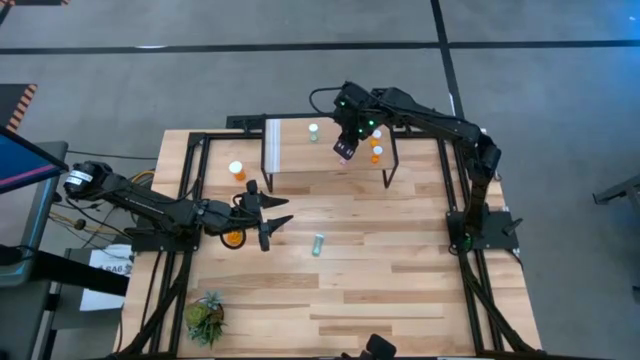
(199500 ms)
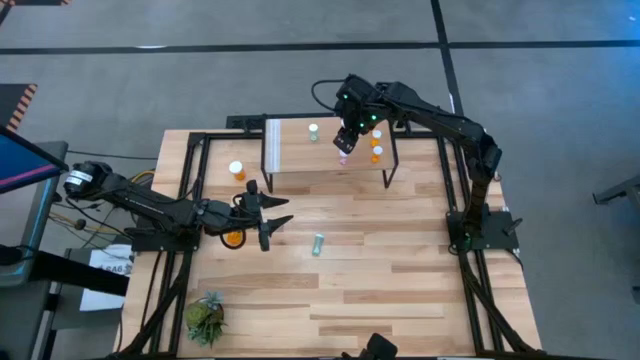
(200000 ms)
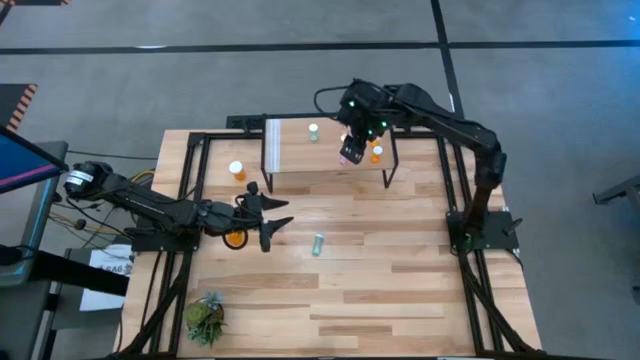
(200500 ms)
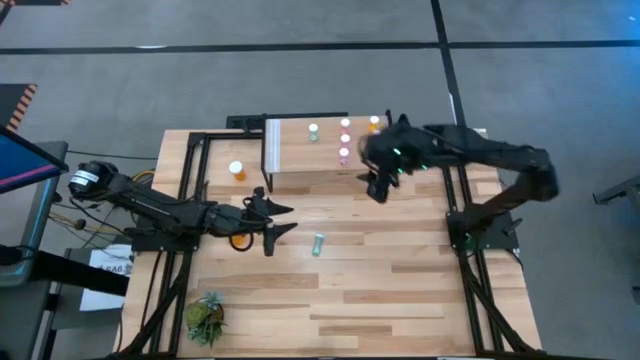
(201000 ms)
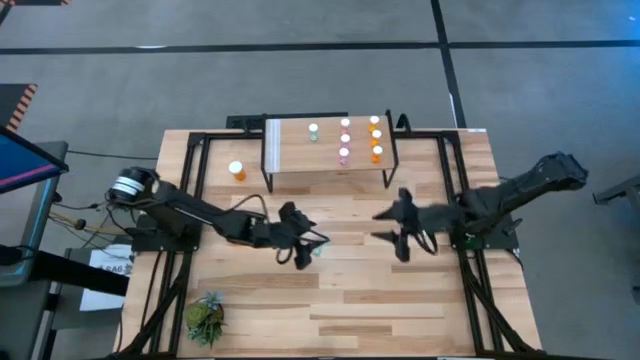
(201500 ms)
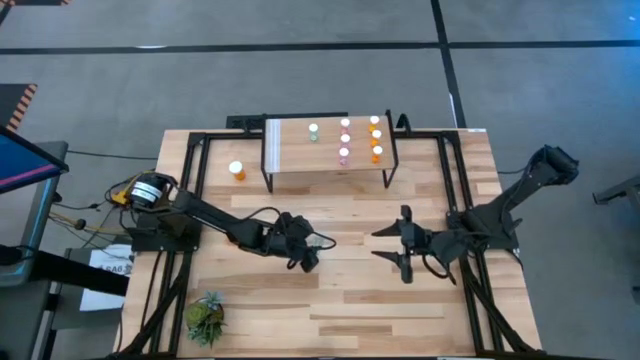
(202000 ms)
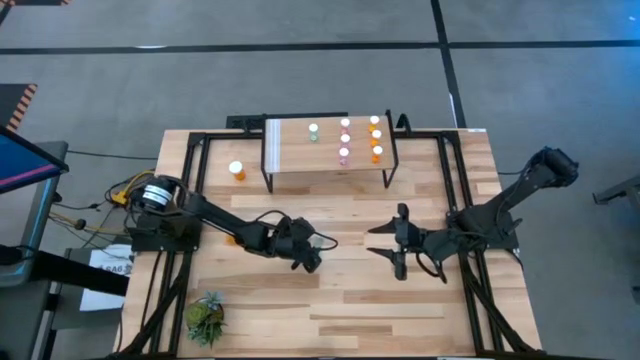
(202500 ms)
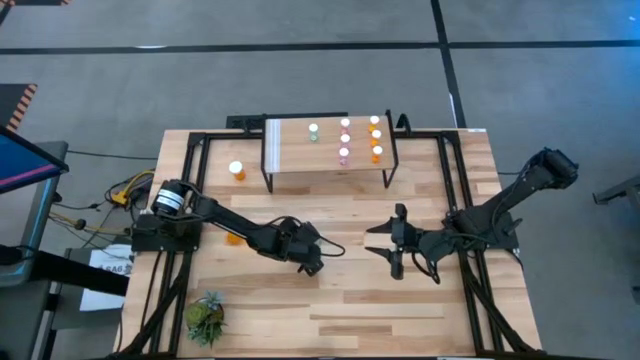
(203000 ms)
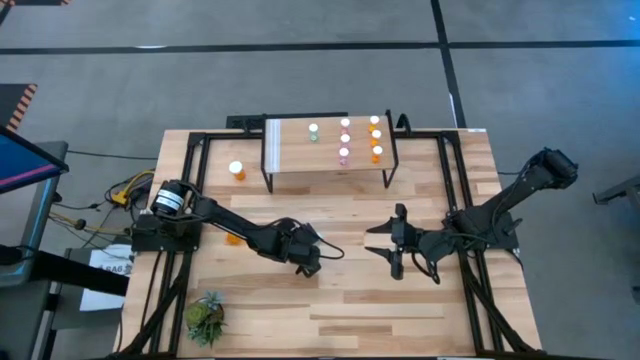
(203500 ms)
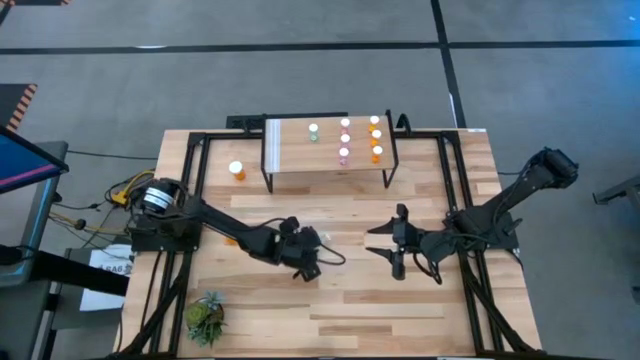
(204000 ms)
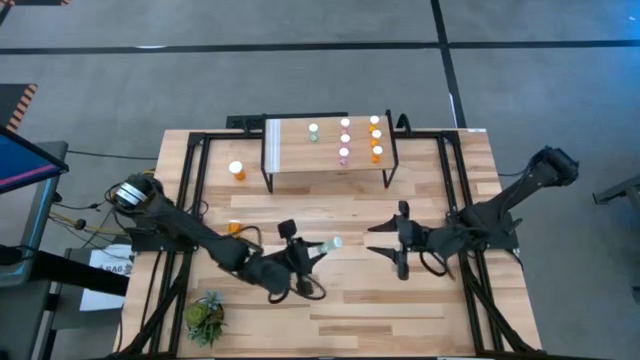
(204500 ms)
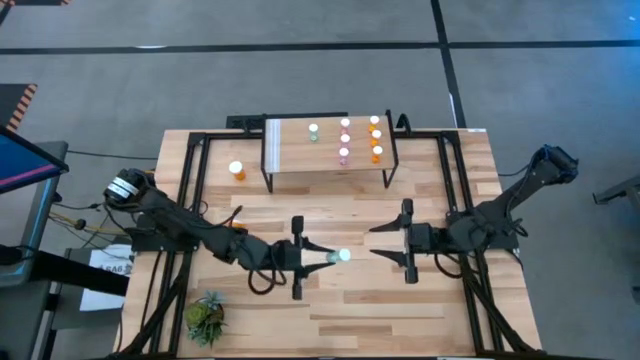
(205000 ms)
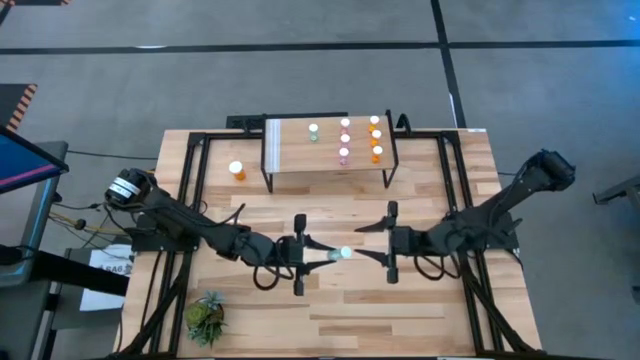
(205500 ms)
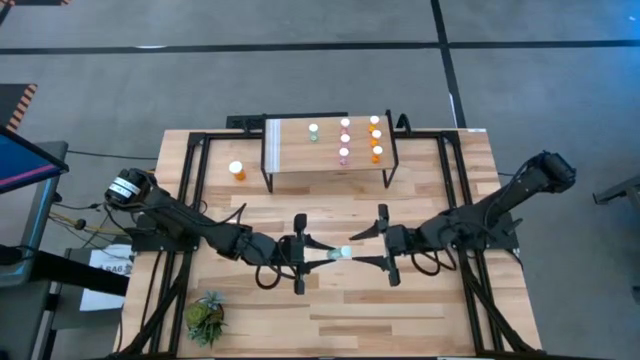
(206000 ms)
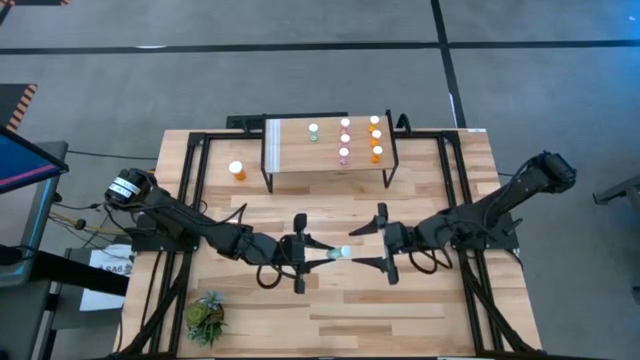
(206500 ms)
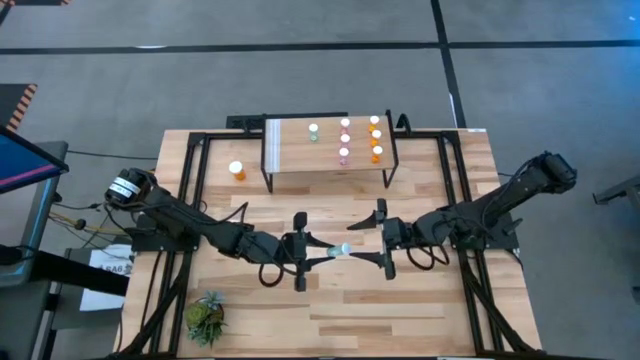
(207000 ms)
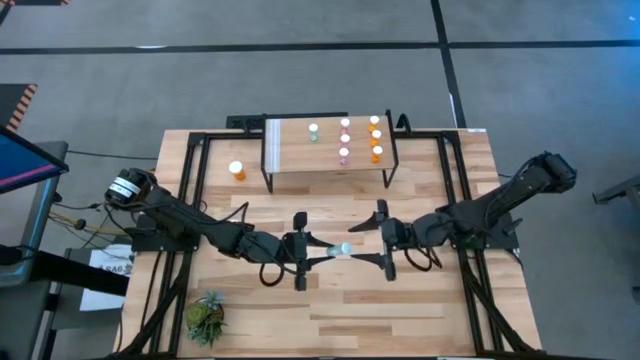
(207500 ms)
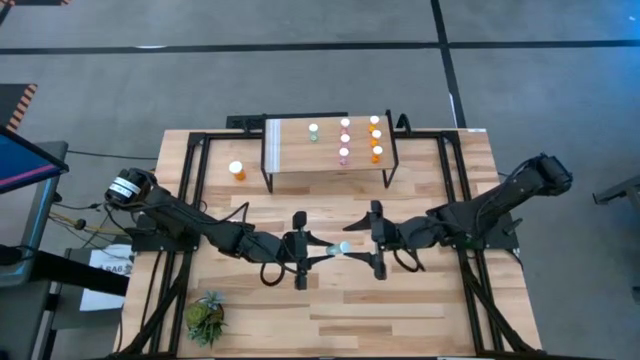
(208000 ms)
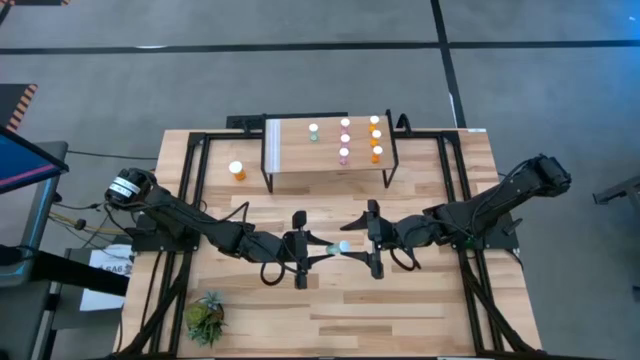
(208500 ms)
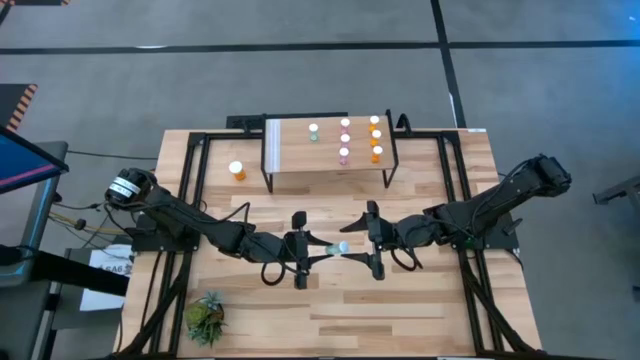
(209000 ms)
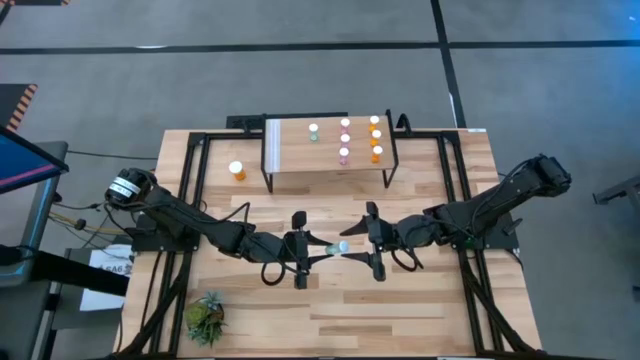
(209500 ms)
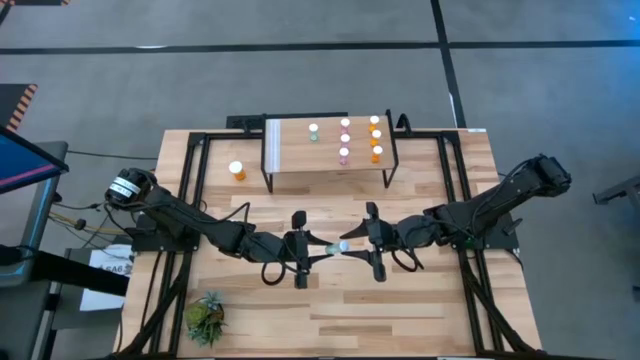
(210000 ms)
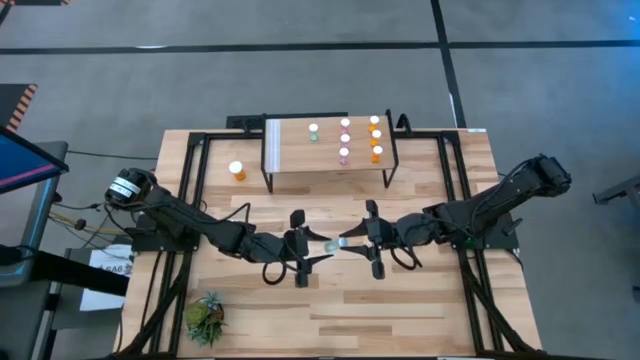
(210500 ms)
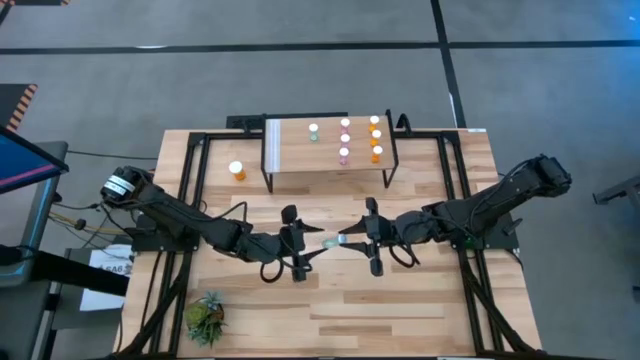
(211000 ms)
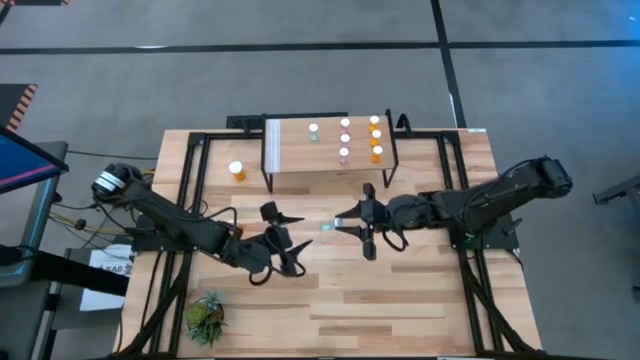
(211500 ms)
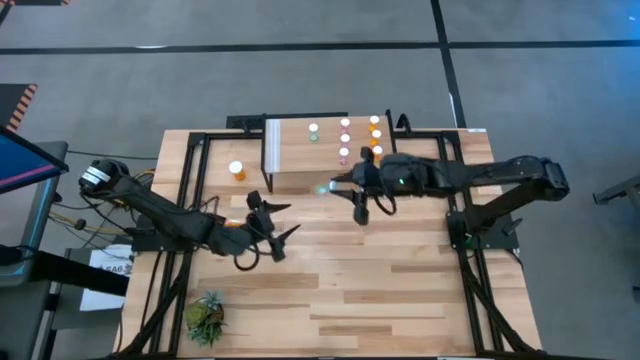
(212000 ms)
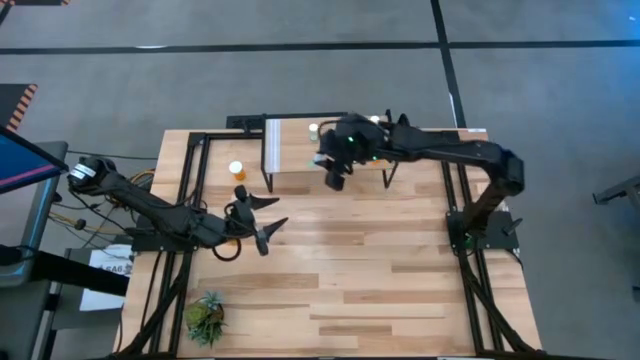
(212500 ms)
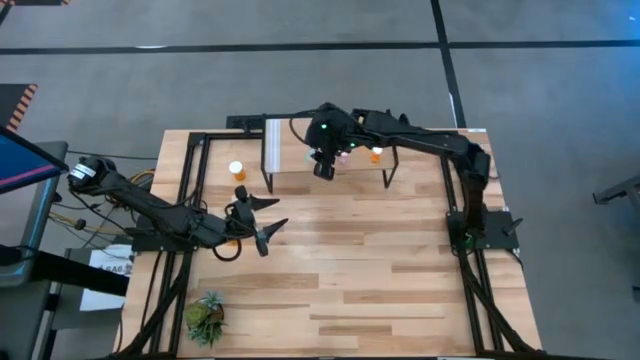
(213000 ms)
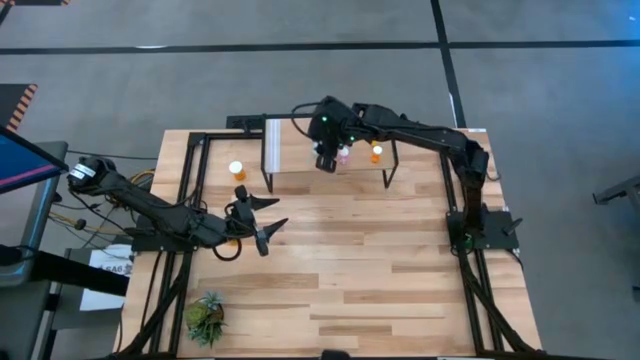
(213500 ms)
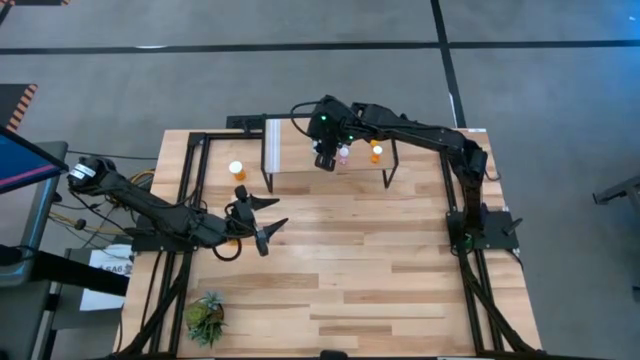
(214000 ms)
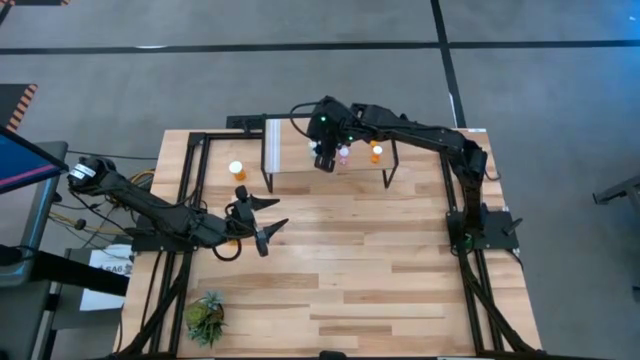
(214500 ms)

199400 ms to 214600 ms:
Task: Pick and place medicine bottles onto shelf by color
Put the blue pill bottle on the shelf aligned with the other blue pill bottle

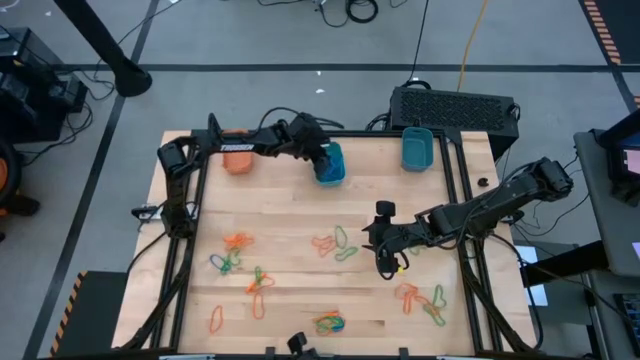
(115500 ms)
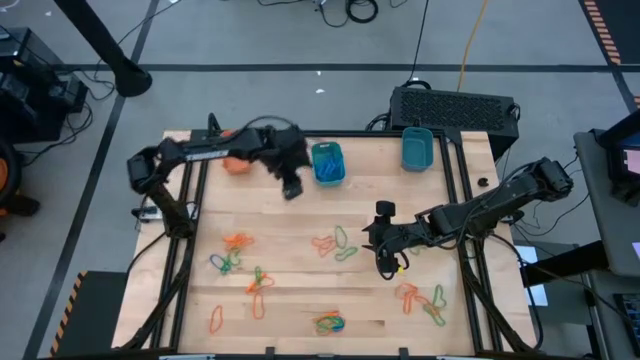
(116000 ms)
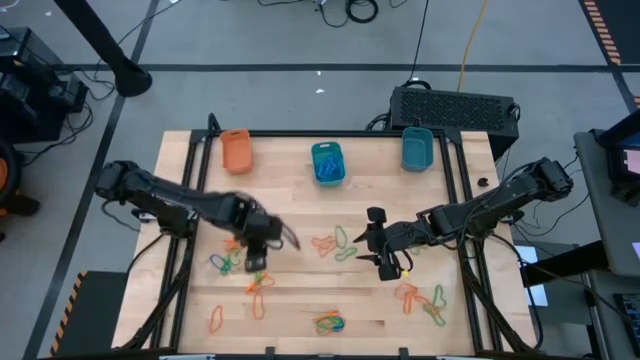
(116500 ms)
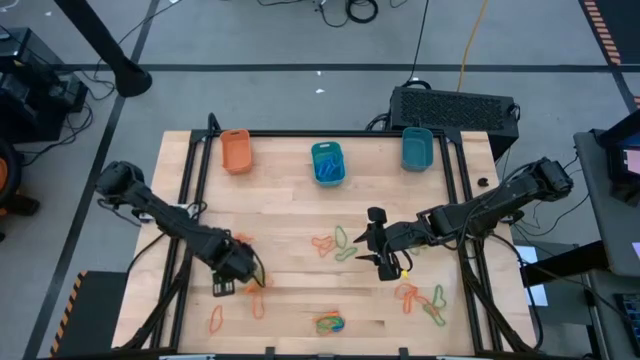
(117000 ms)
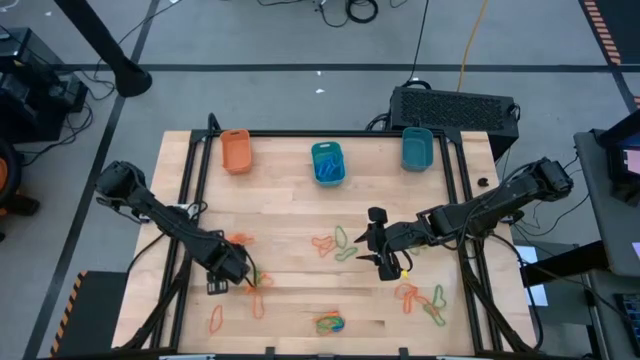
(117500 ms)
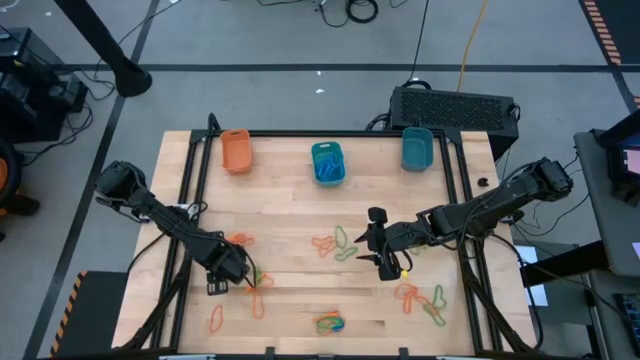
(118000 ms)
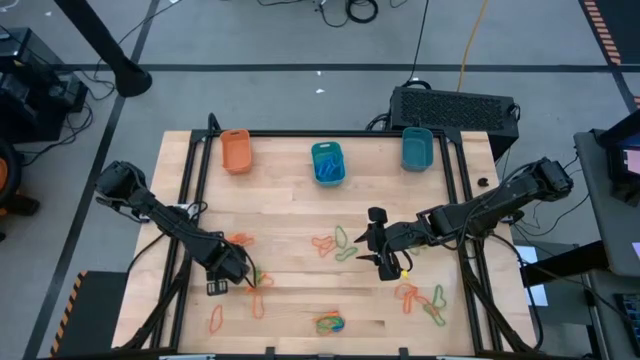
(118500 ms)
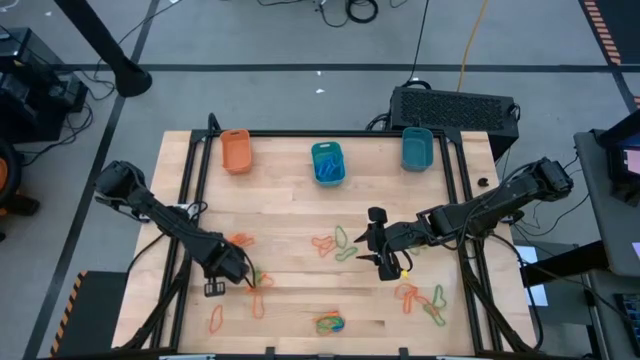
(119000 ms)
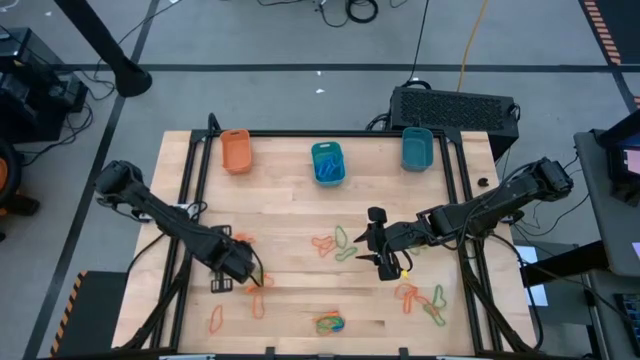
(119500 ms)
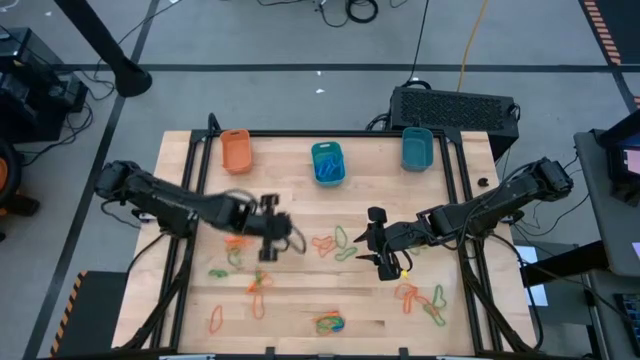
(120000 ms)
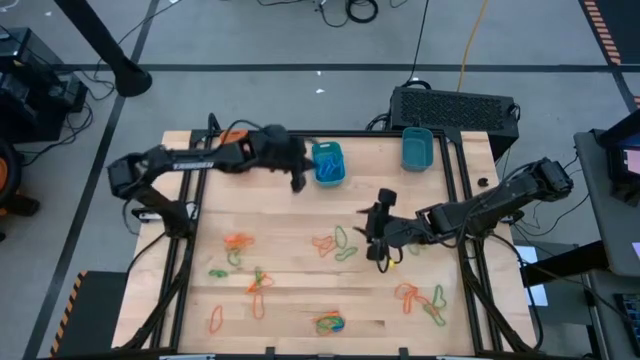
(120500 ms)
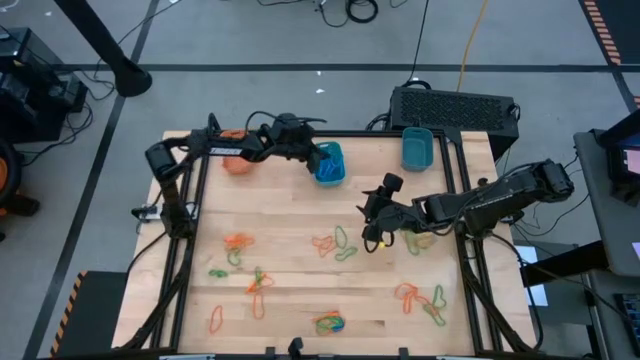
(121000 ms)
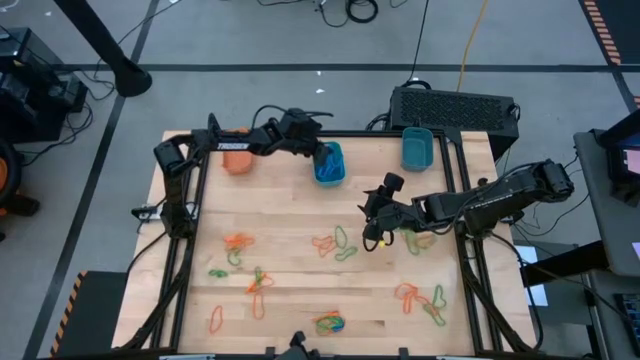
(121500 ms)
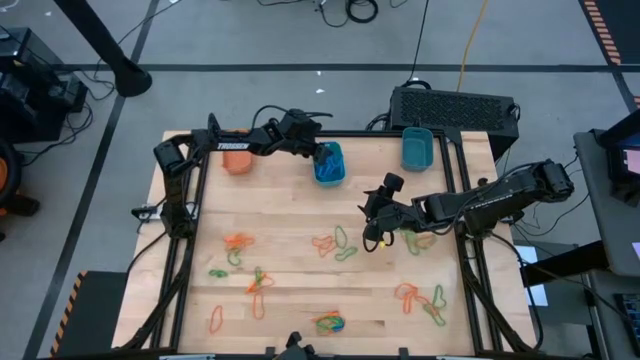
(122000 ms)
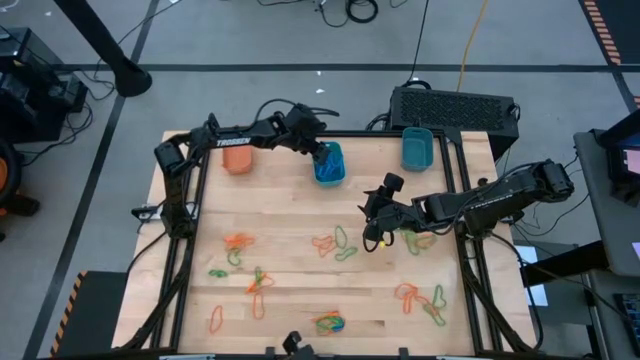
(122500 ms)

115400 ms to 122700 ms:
Task: Sort rubber bands into baskets
Put the blue rubber band into the light blue bin
